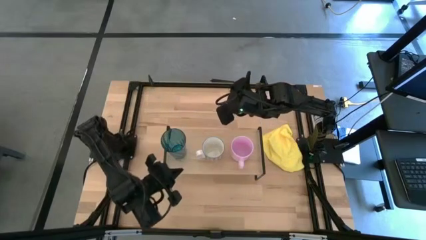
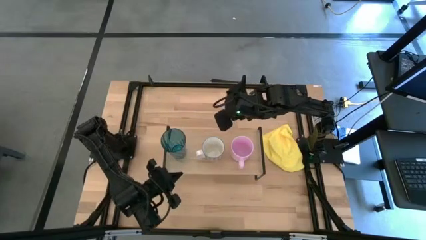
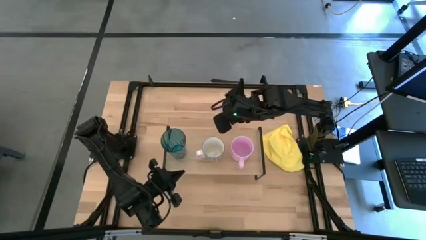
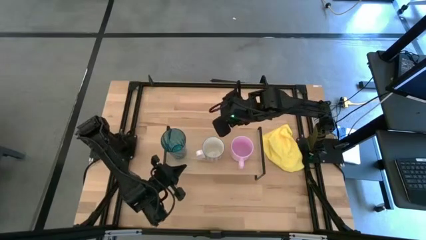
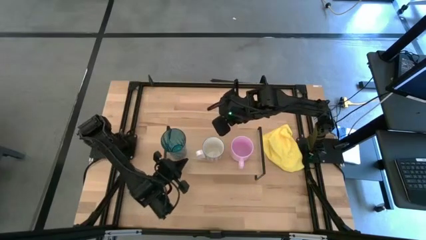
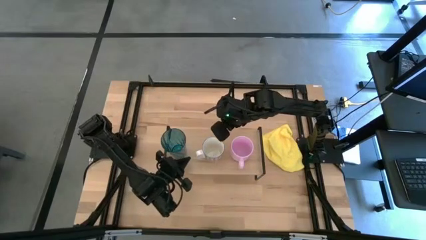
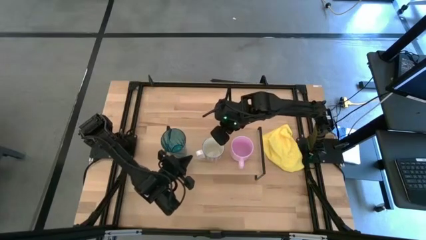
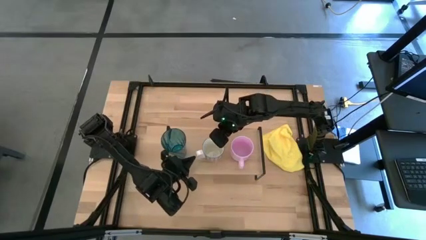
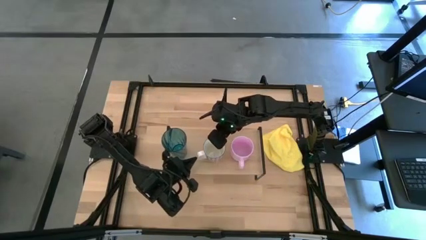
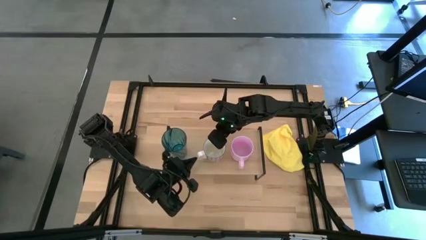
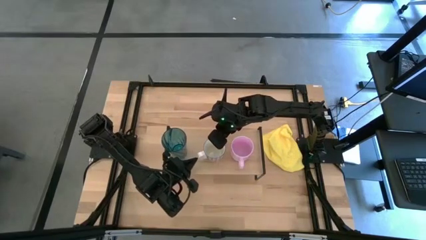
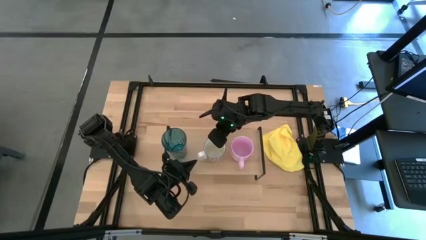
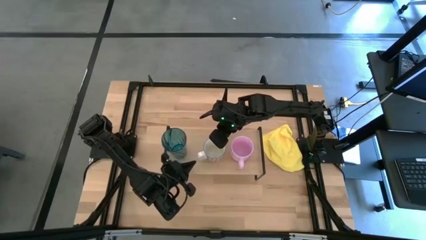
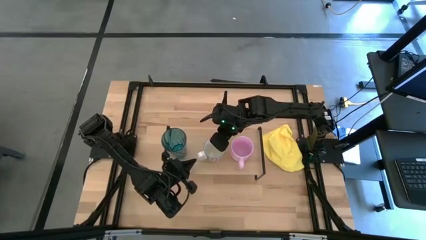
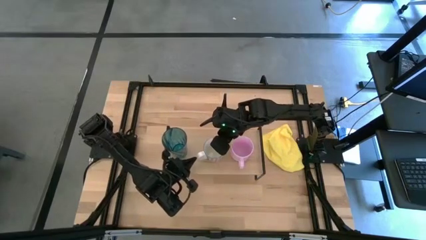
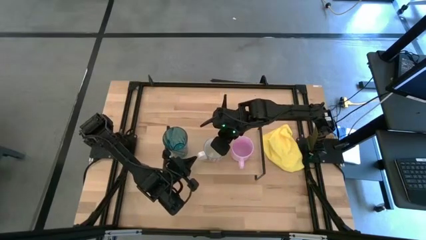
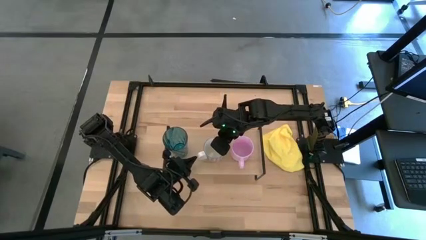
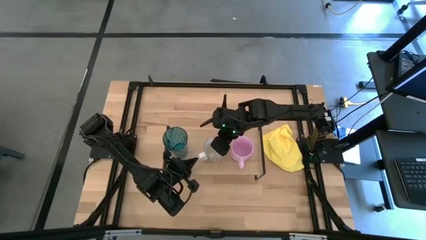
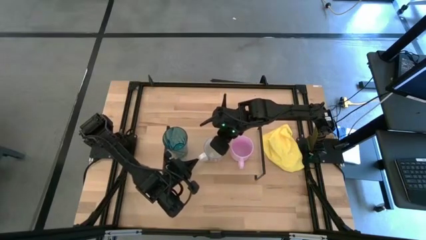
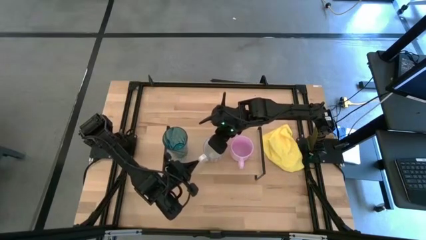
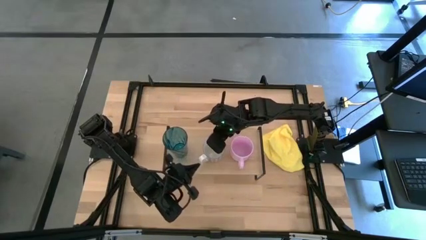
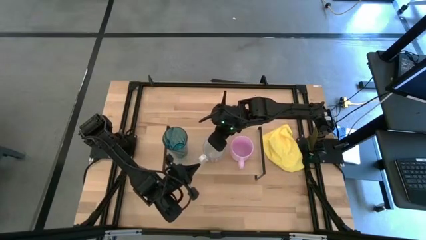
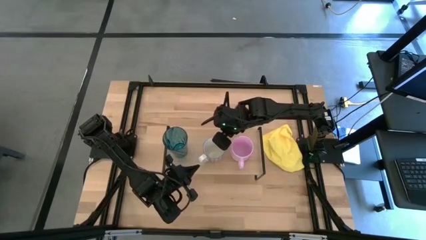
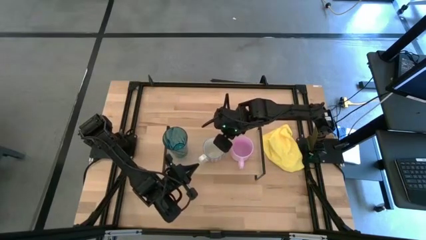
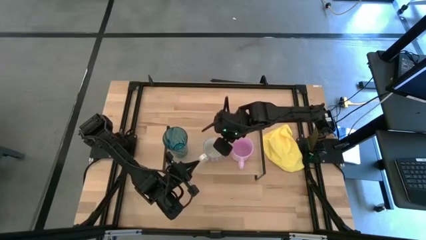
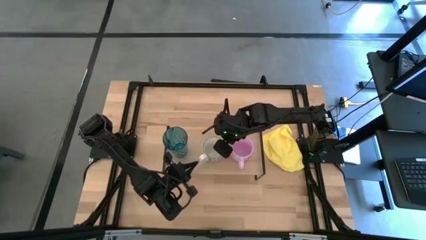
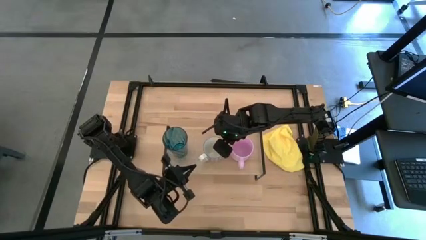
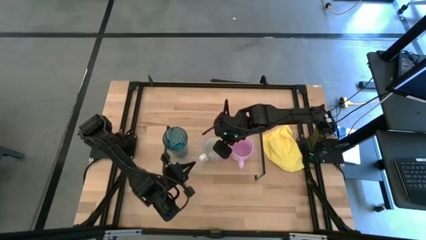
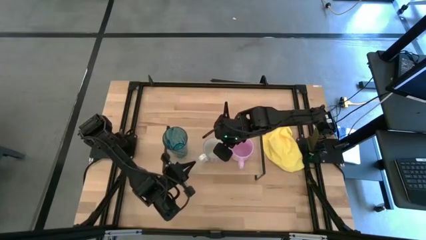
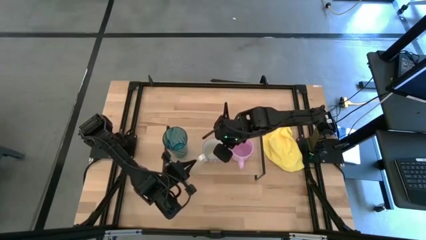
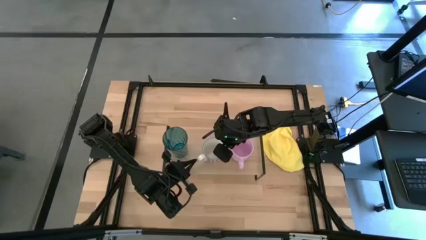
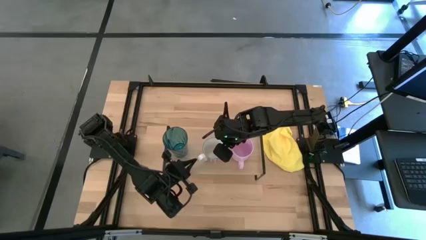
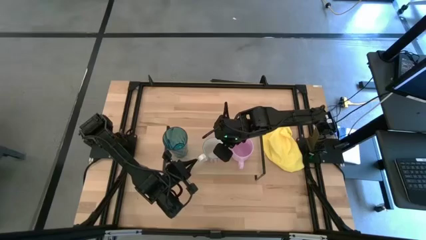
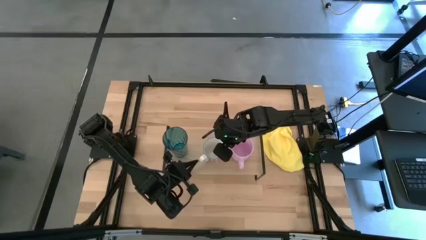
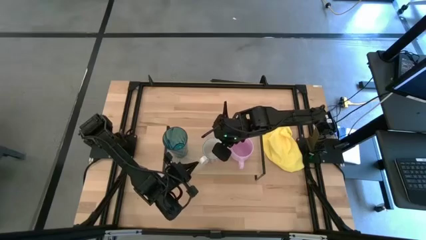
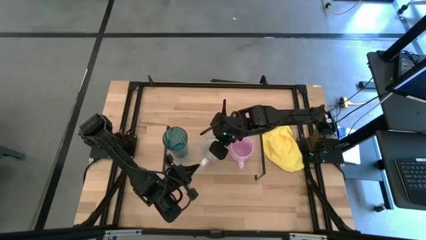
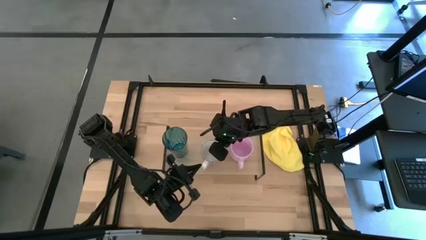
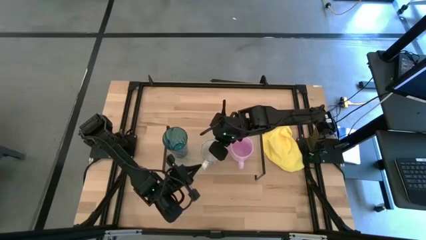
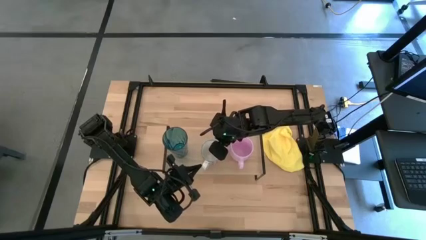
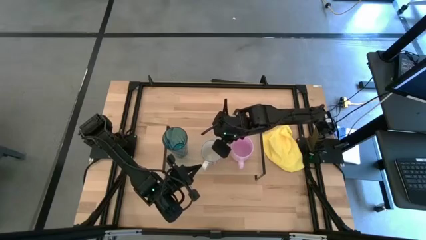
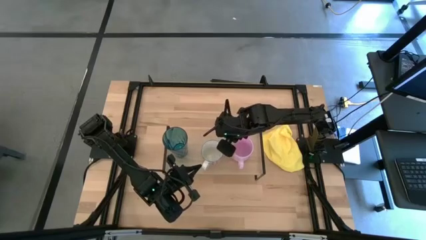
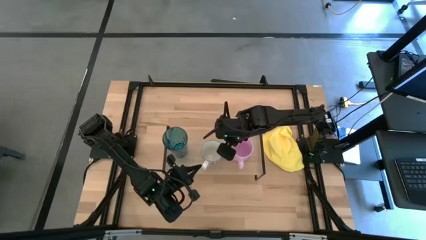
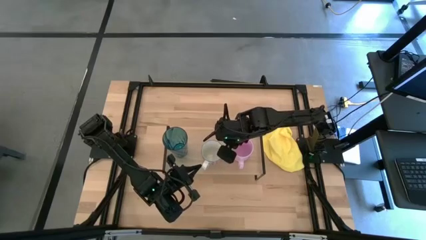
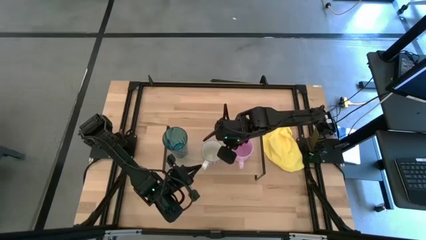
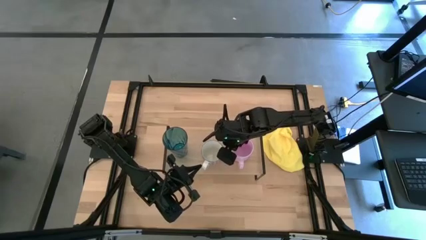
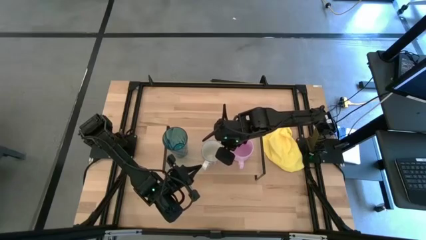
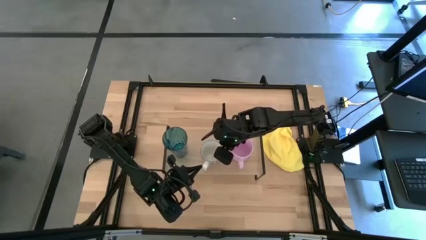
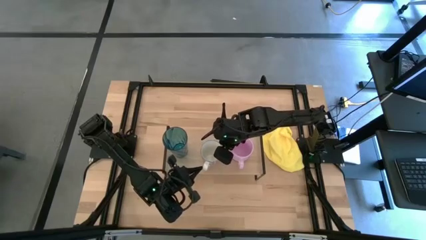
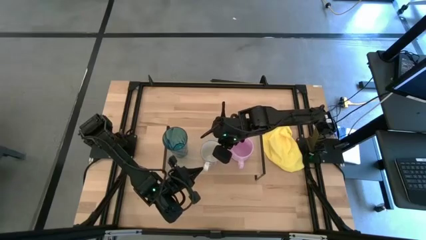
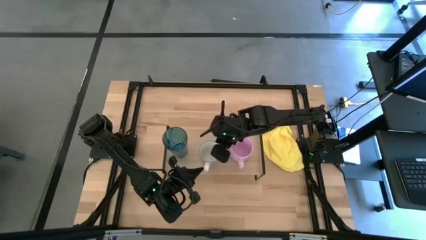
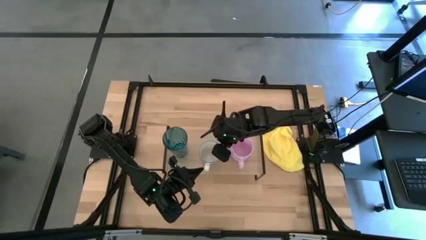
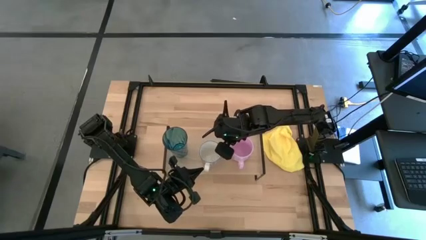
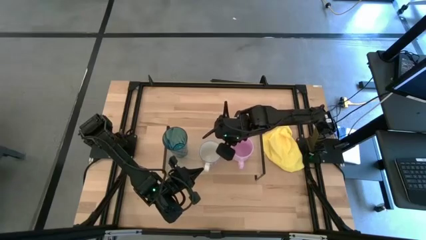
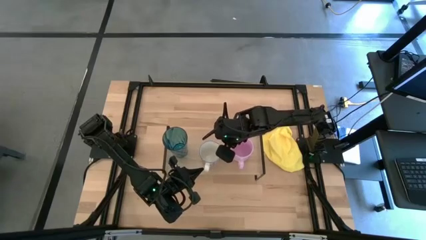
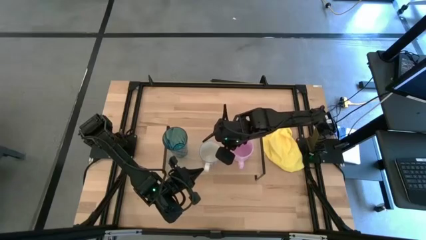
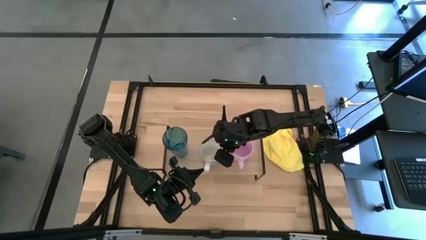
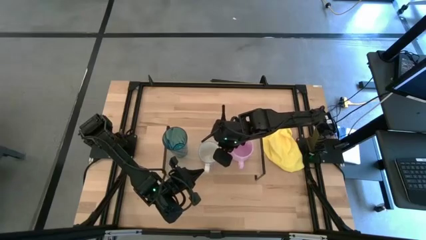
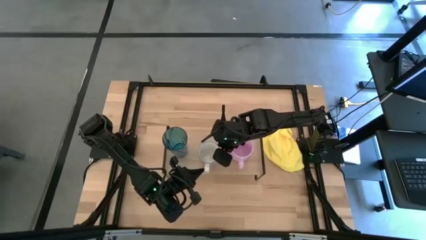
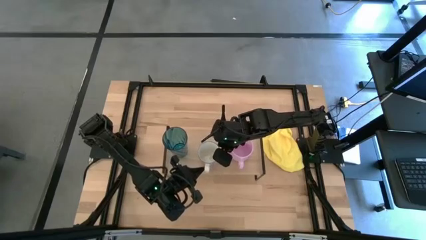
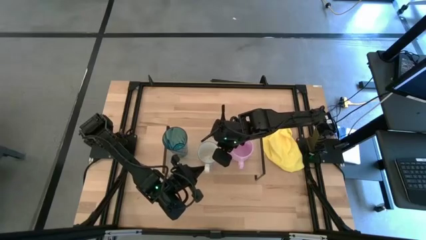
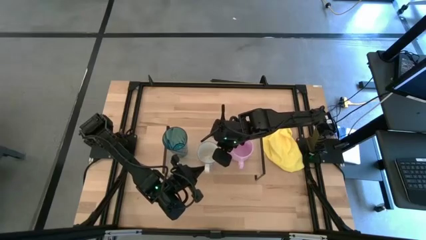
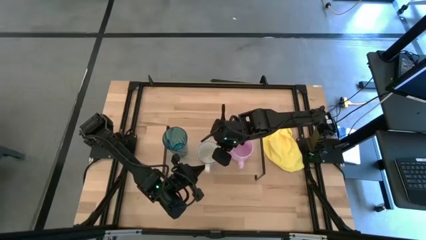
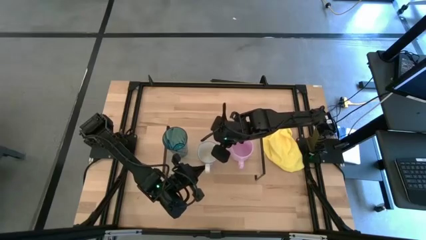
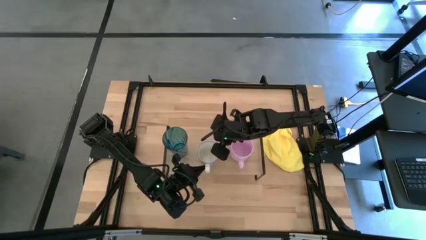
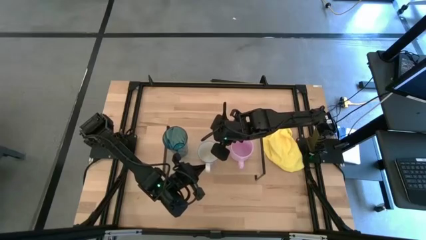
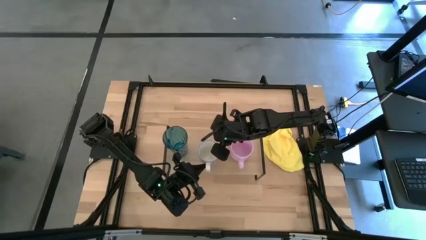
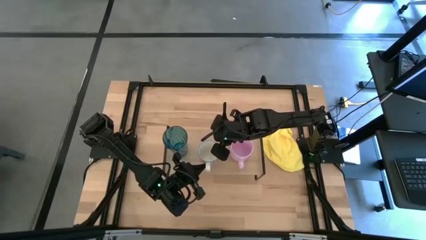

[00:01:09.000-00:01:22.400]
Task: Stack small to large cups/mugs on shelf
Put the red cup on the shelf
